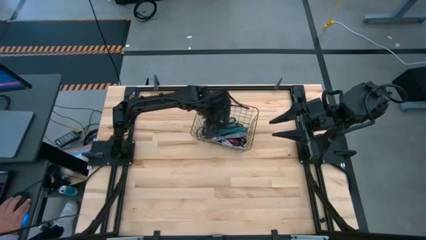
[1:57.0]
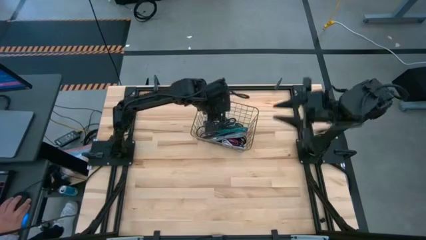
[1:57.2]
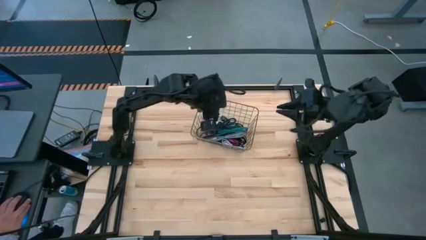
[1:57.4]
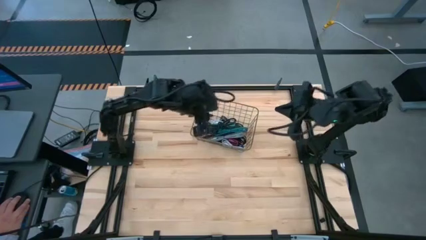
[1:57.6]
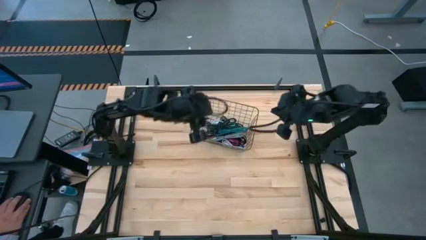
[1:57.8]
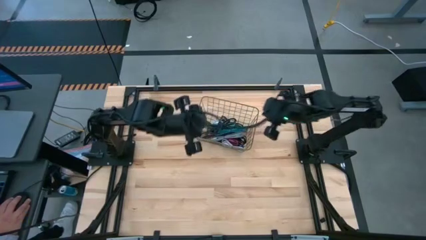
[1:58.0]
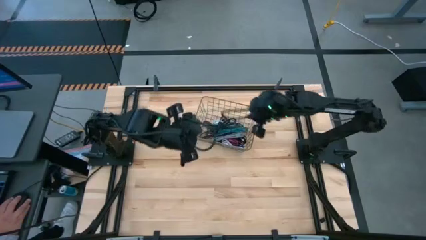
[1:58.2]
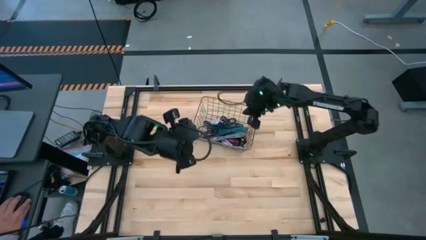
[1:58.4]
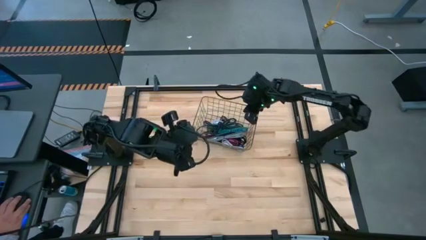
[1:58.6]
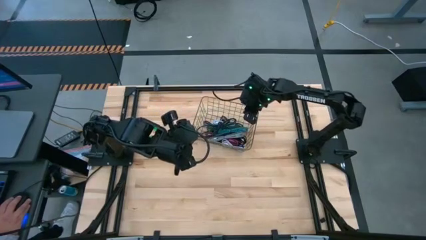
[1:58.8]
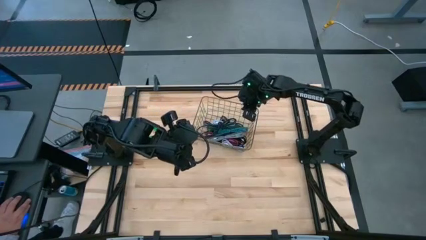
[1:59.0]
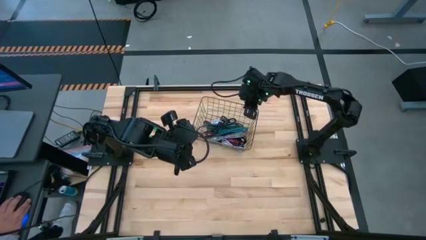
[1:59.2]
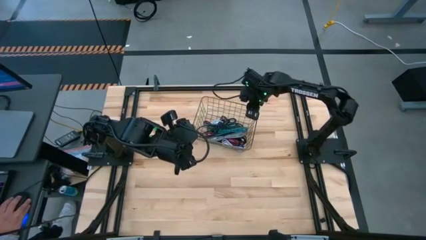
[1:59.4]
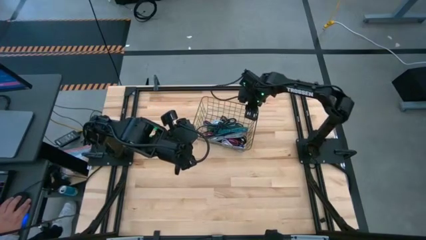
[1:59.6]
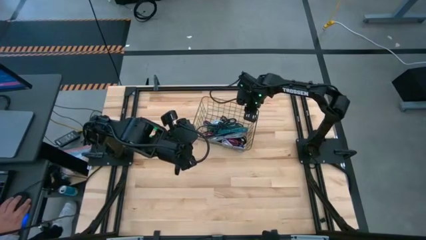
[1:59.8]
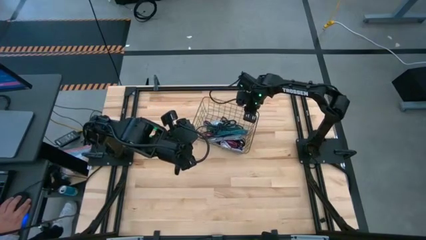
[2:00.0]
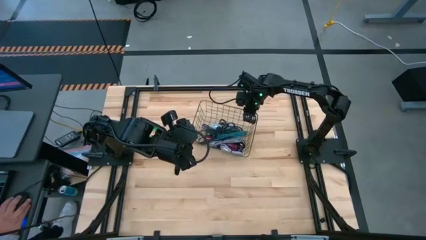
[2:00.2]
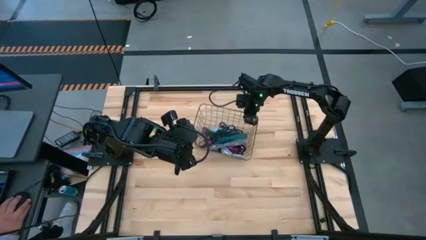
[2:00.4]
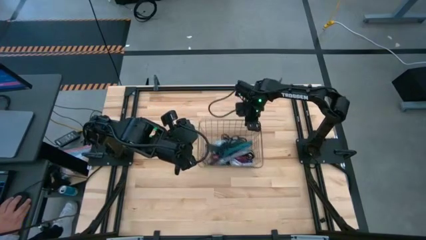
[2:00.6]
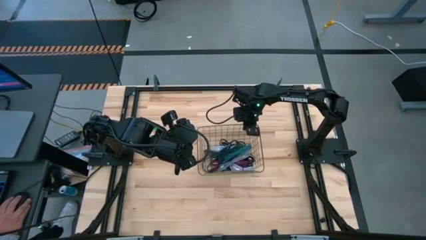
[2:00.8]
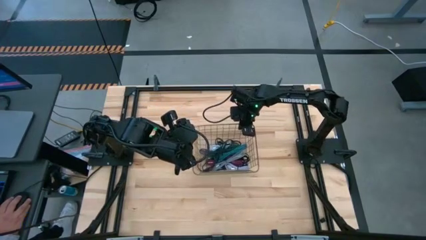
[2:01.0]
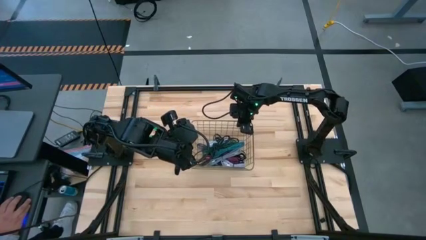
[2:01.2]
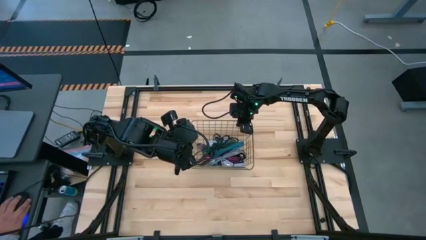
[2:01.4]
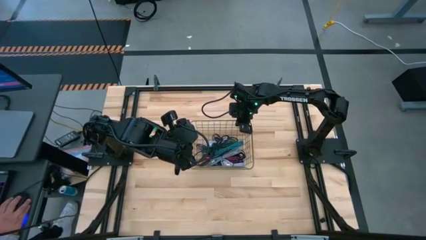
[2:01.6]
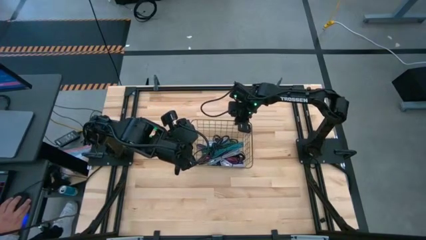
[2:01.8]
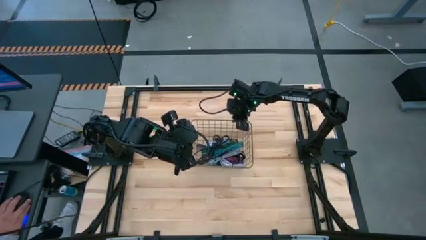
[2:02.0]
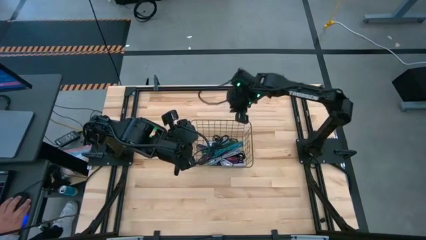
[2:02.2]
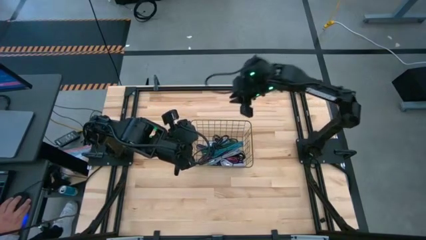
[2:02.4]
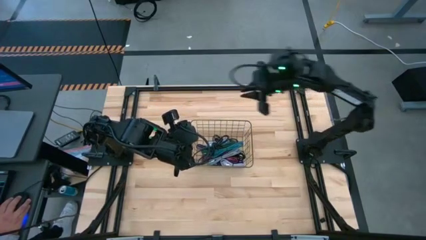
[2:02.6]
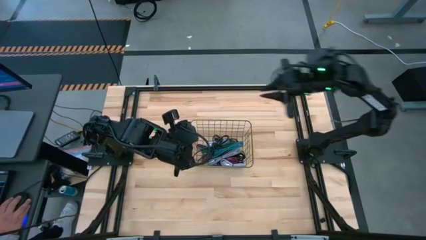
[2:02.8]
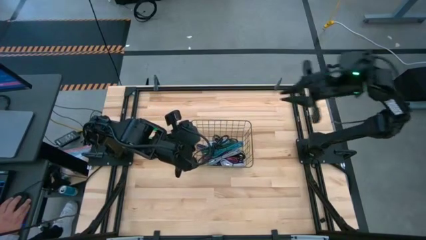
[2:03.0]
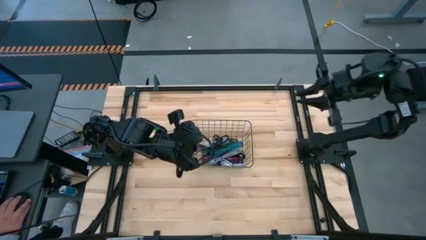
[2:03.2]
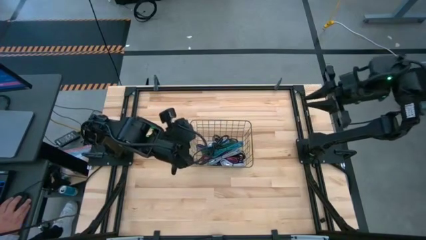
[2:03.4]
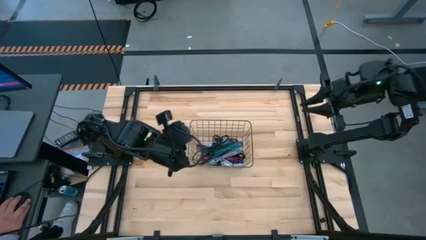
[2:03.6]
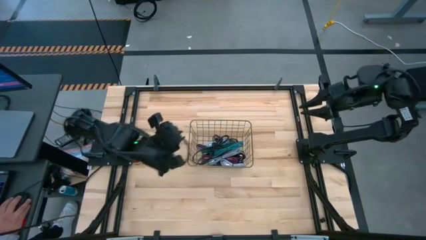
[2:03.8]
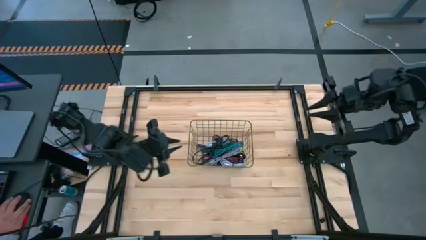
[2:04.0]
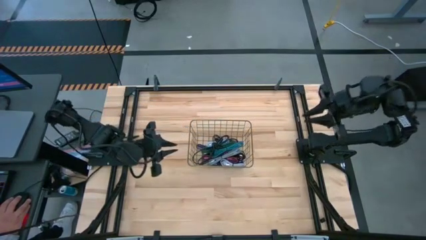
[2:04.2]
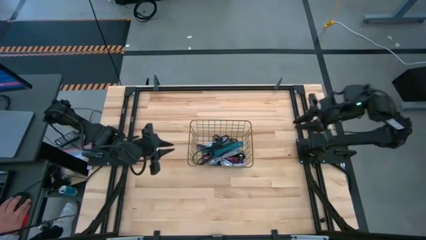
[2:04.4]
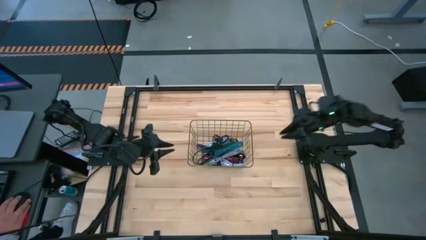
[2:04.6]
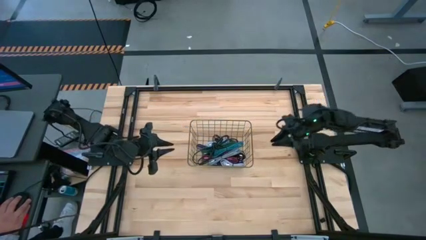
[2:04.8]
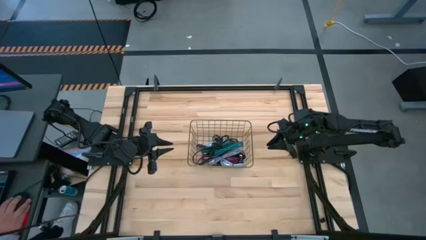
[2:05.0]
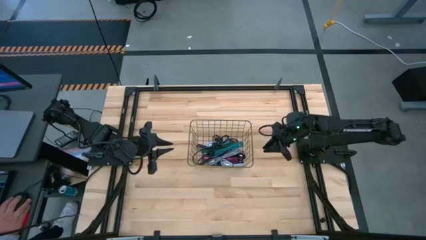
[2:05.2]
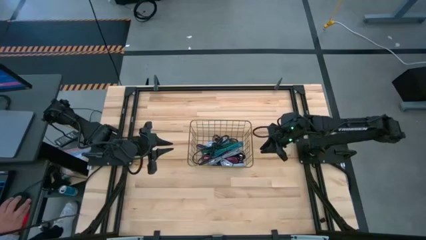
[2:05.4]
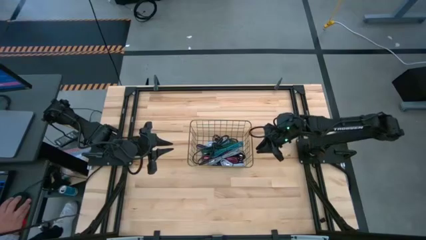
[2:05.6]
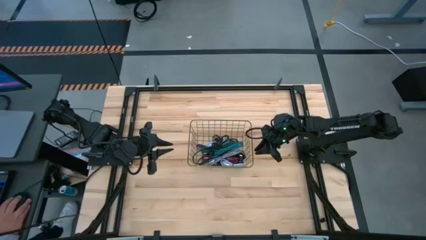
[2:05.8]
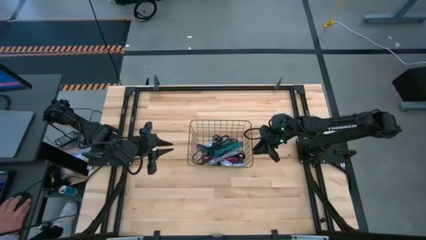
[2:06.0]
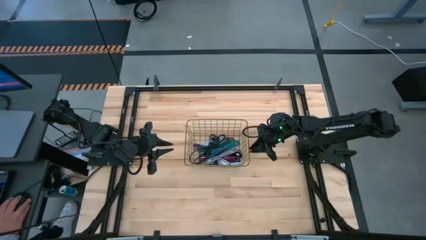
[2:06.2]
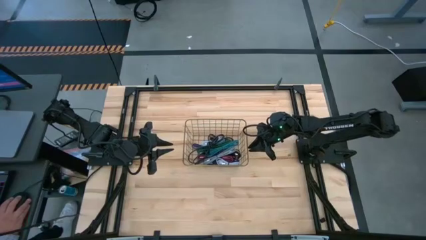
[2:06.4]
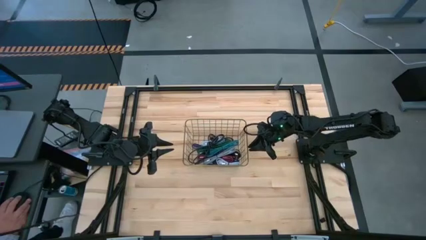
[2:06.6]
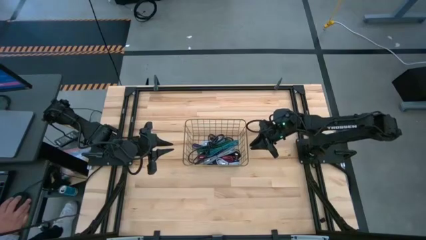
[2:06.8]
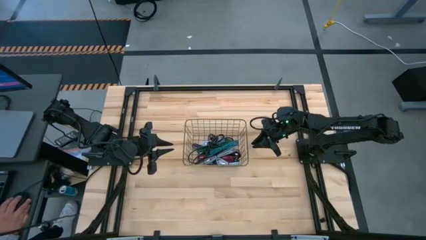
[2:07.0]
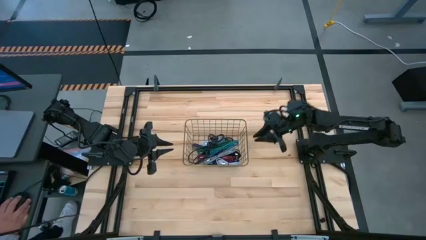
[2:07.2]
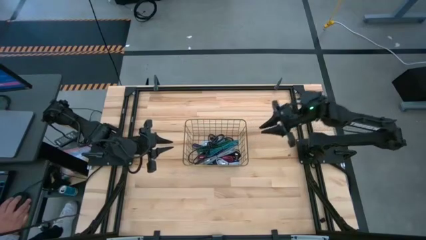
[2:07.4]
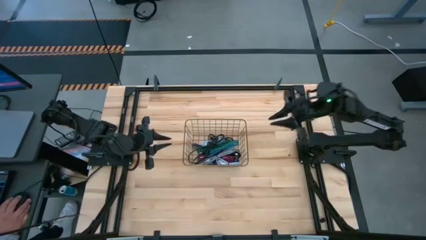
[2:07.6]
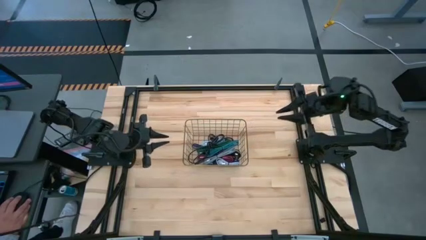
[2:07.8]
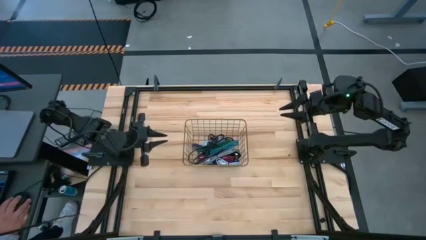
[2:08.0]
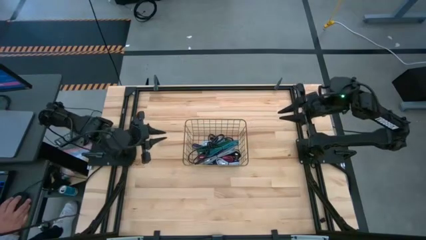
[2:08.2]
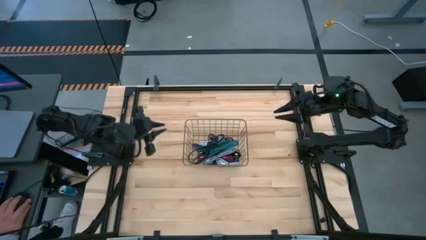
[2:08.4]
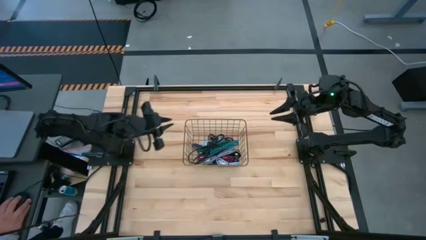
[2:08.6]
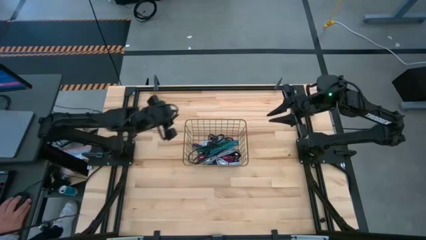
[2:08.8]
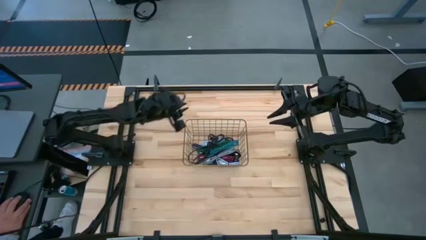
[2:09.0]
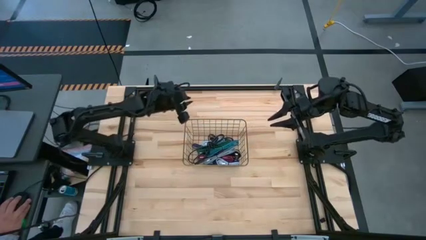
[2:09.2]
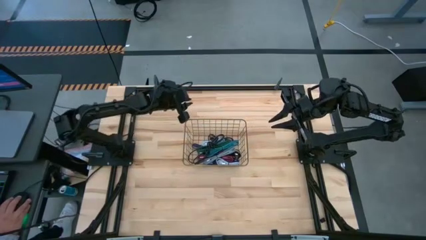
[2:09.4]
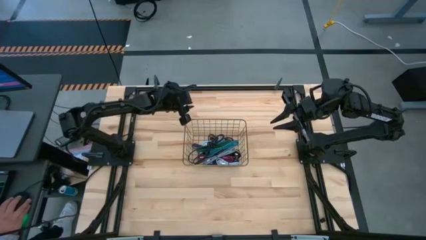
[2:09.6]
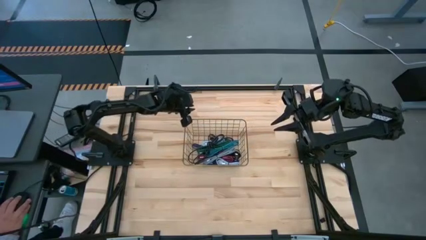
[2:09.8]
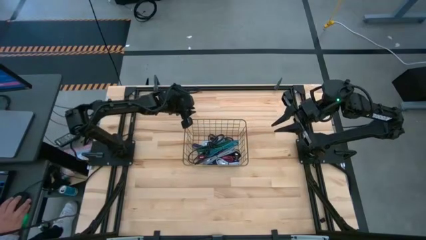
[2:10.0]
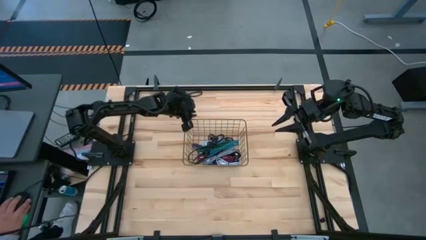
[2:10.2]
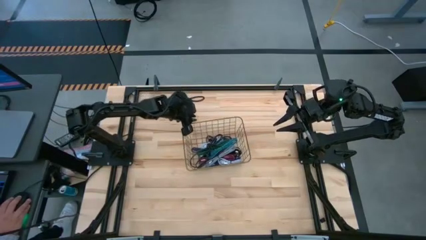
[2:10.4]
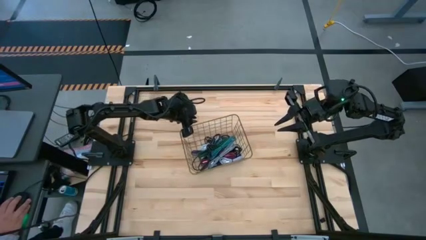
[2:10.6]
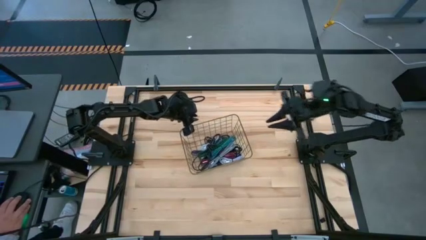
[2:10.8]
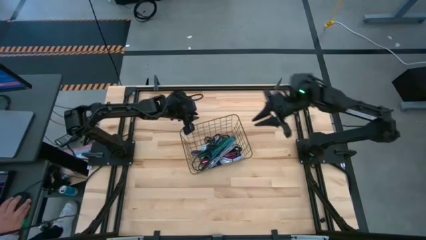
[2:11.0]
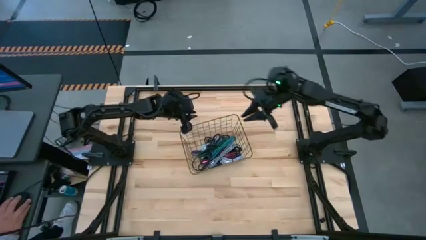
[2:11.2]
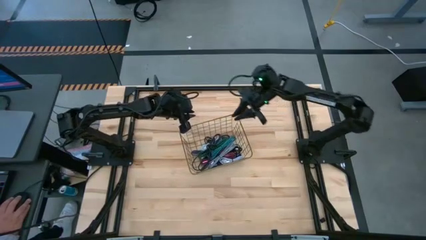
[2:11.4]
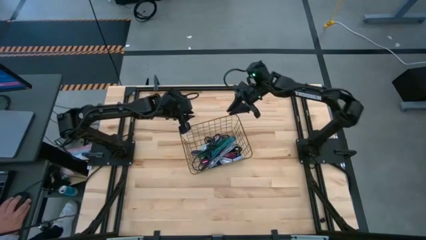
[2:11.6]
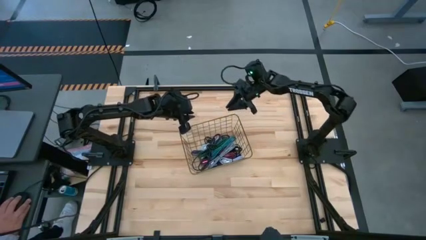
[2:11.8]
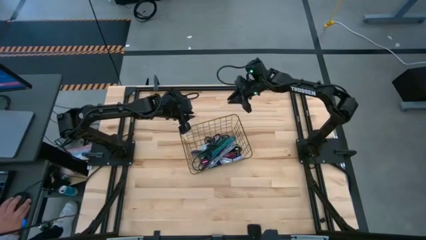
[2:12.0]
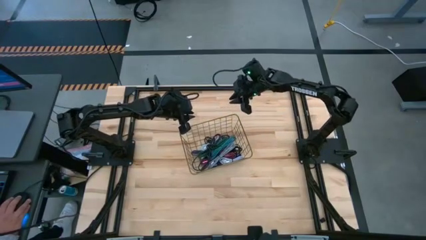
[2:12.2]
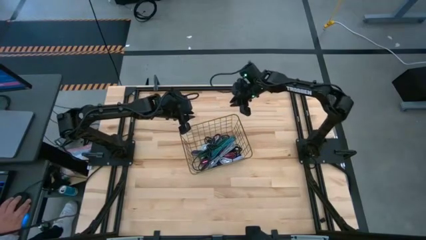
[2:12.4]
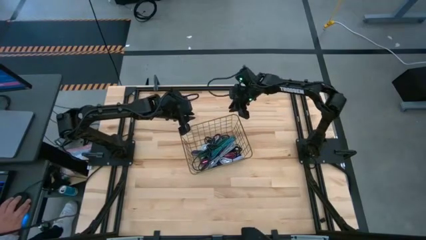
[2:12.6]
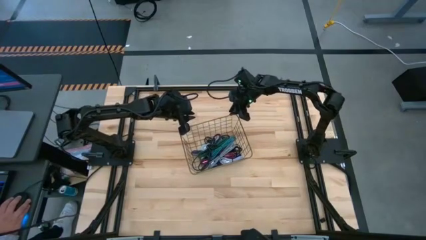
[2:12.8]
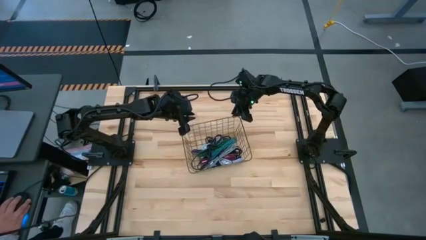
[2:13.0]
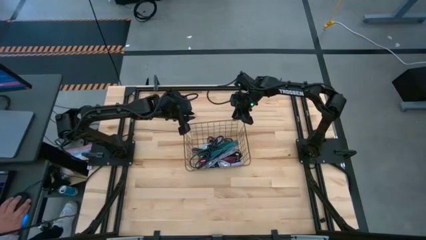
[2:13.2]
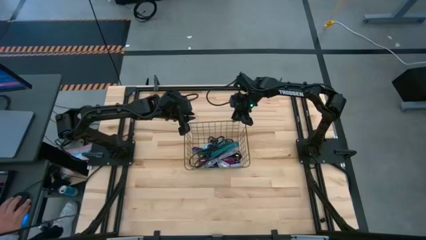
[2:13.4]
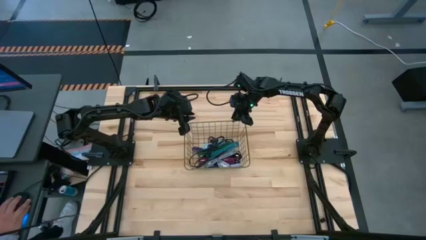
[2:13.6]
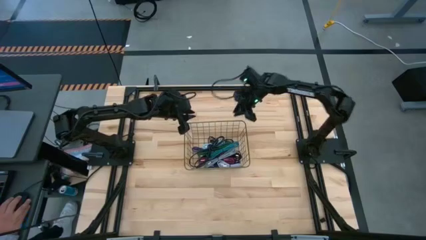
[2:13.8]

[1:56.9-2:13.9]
Task: Pick and place USB-C Cables
Adjust the gold wire basket
